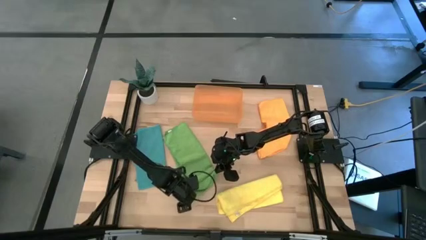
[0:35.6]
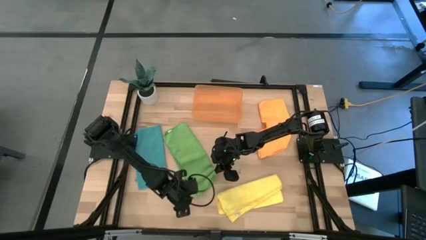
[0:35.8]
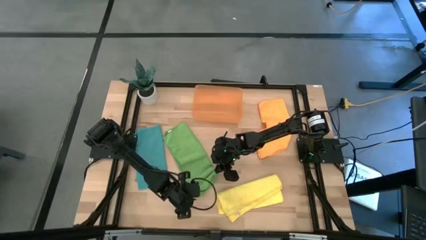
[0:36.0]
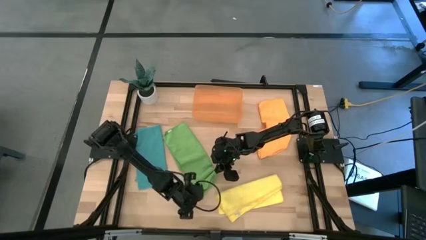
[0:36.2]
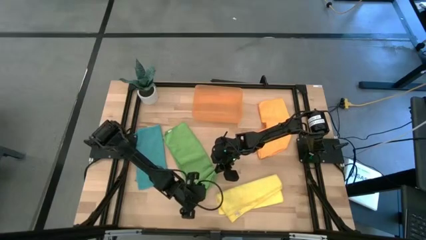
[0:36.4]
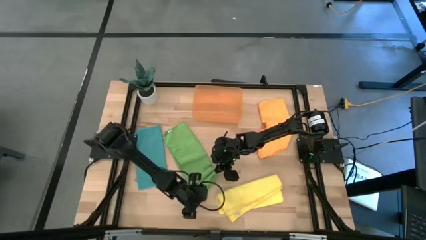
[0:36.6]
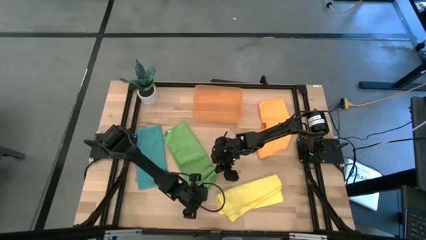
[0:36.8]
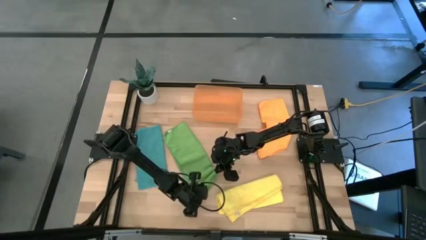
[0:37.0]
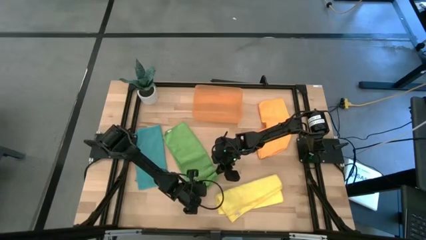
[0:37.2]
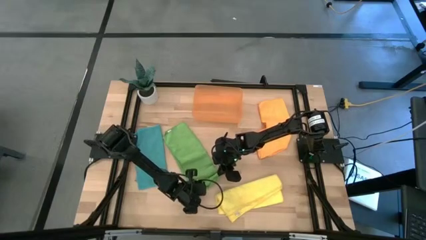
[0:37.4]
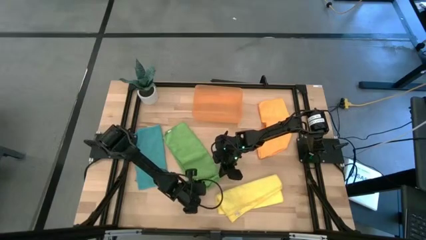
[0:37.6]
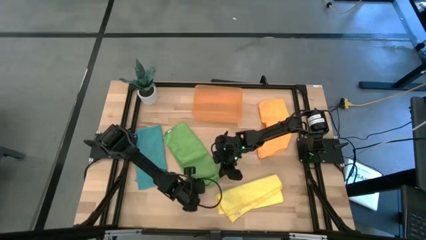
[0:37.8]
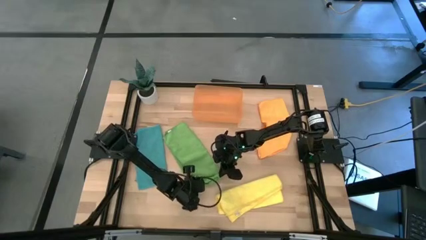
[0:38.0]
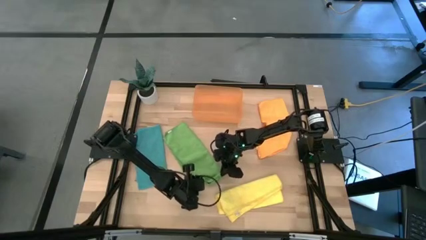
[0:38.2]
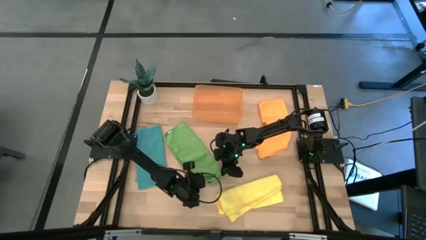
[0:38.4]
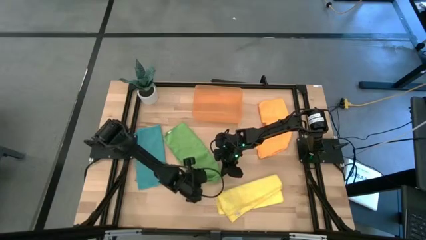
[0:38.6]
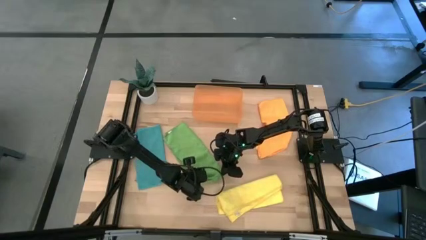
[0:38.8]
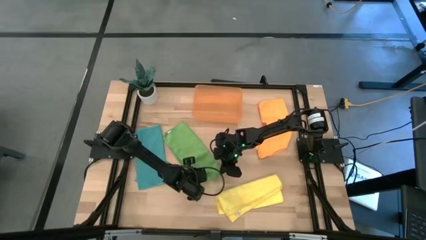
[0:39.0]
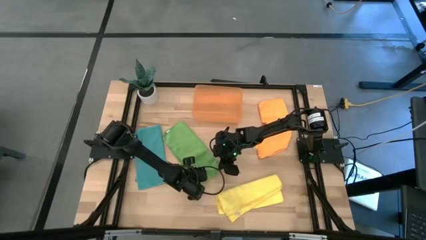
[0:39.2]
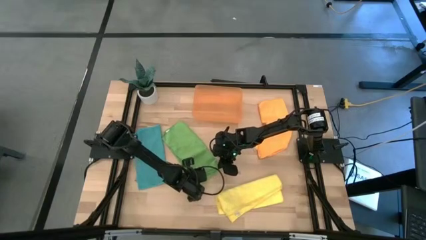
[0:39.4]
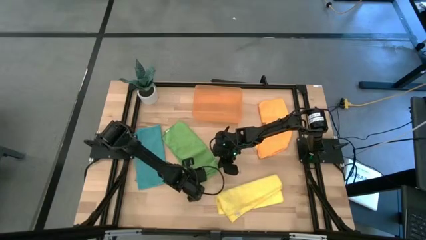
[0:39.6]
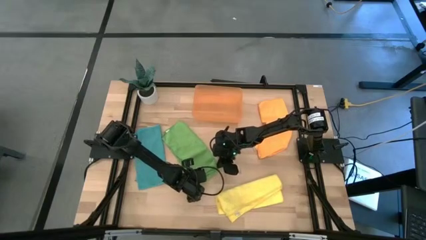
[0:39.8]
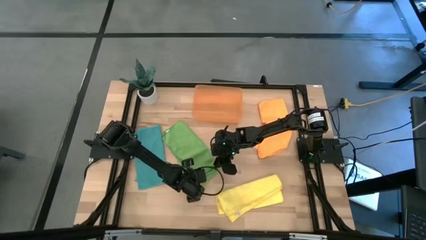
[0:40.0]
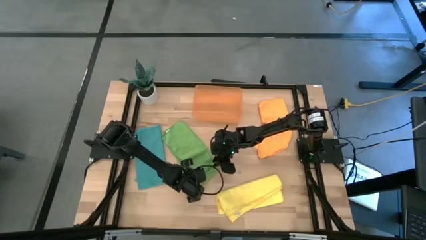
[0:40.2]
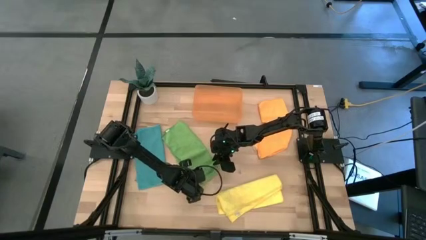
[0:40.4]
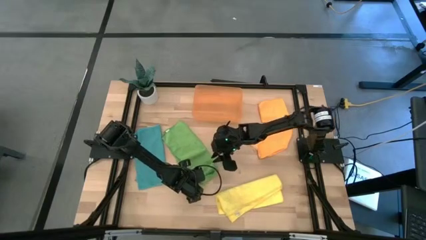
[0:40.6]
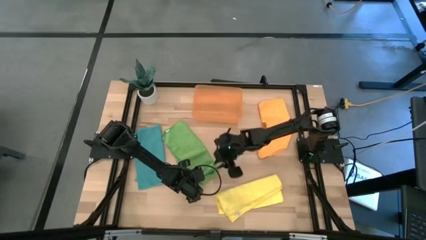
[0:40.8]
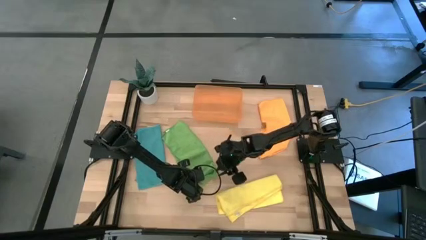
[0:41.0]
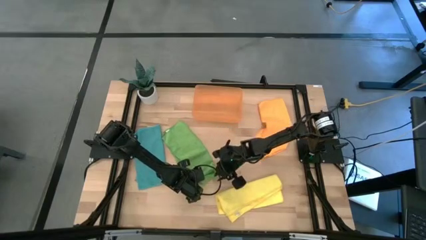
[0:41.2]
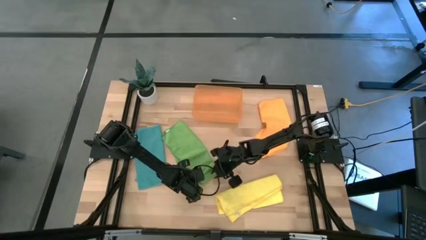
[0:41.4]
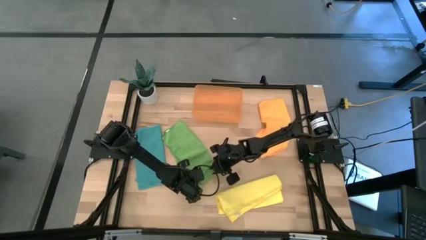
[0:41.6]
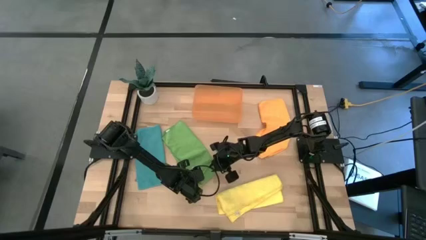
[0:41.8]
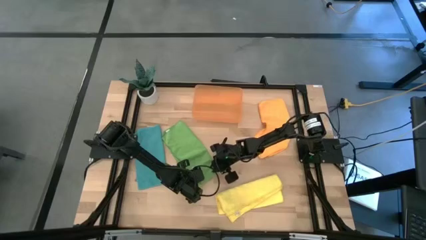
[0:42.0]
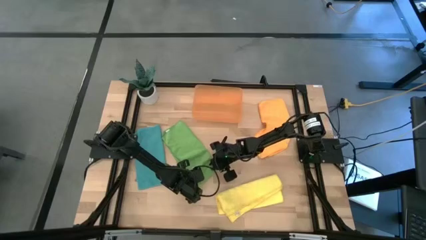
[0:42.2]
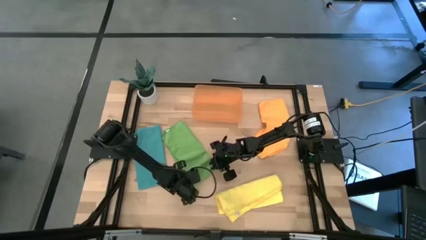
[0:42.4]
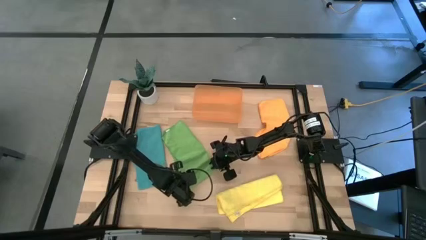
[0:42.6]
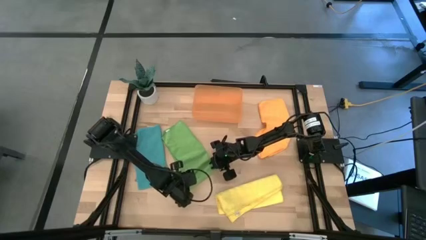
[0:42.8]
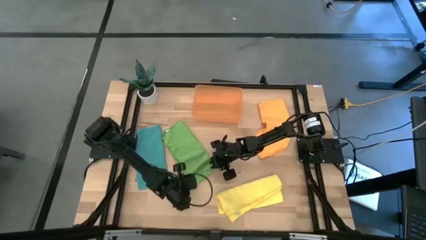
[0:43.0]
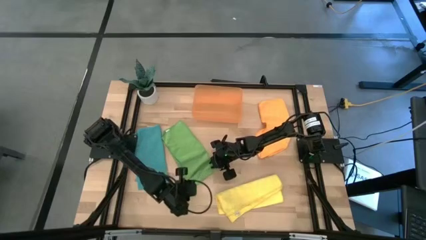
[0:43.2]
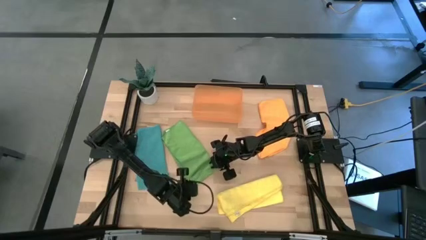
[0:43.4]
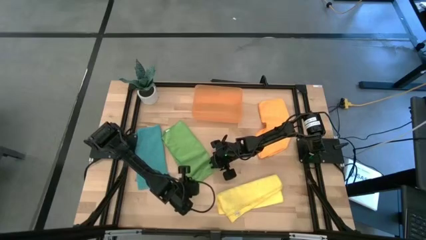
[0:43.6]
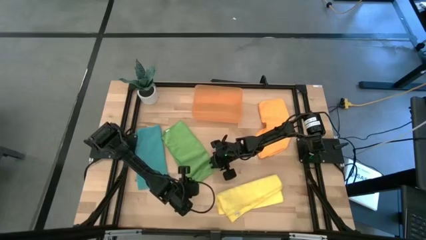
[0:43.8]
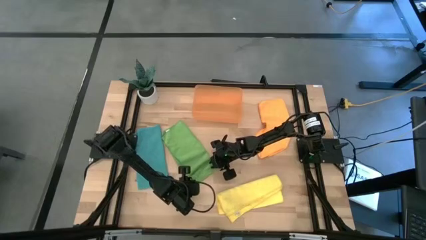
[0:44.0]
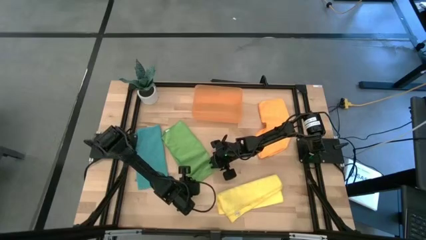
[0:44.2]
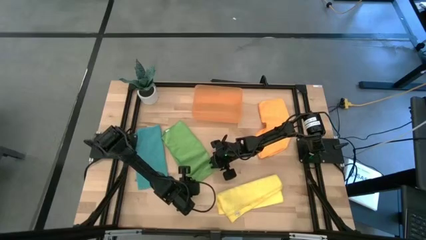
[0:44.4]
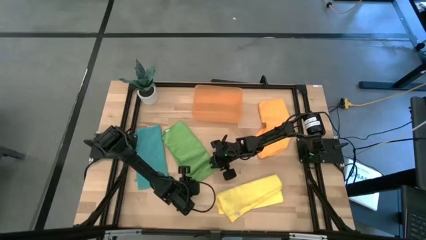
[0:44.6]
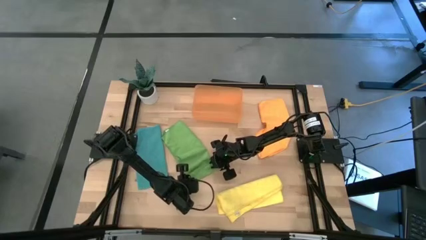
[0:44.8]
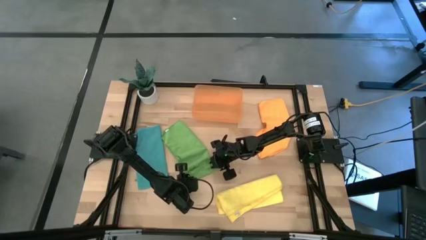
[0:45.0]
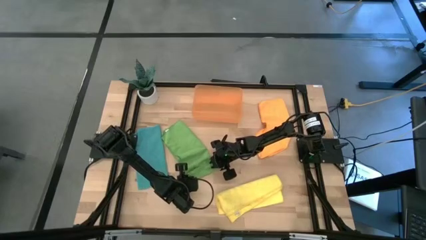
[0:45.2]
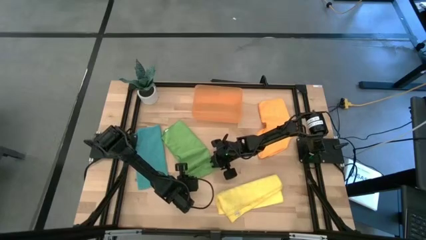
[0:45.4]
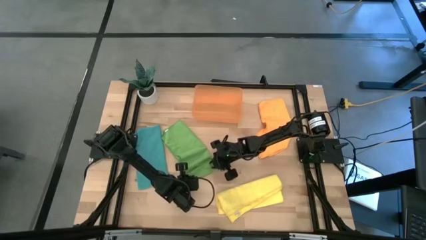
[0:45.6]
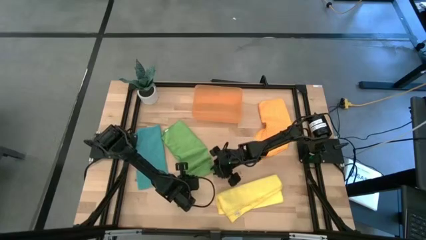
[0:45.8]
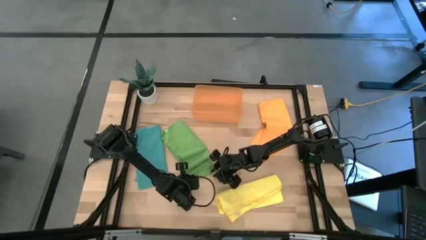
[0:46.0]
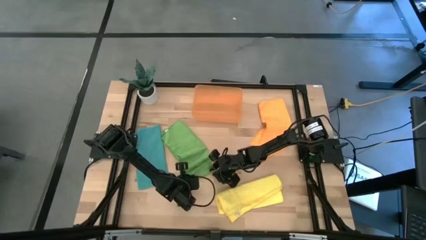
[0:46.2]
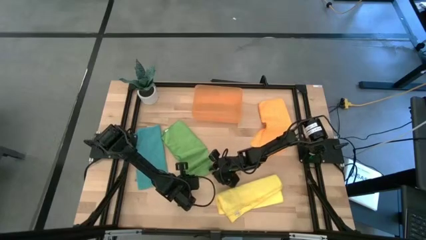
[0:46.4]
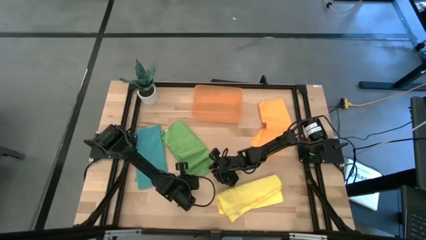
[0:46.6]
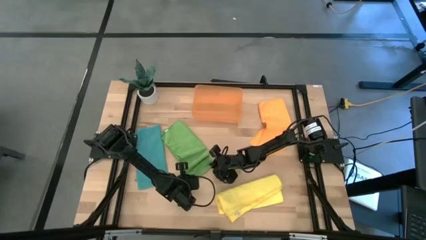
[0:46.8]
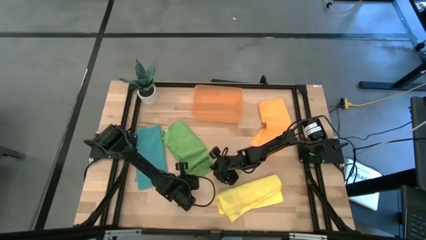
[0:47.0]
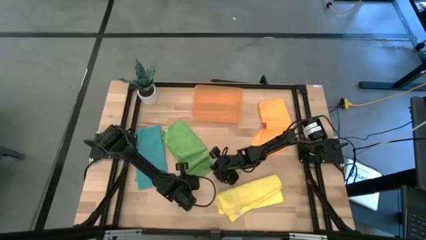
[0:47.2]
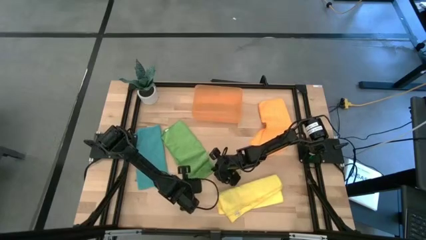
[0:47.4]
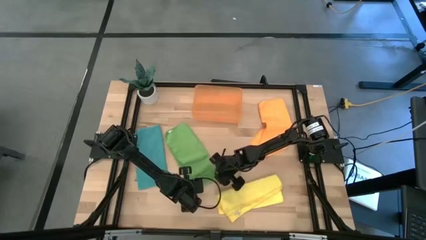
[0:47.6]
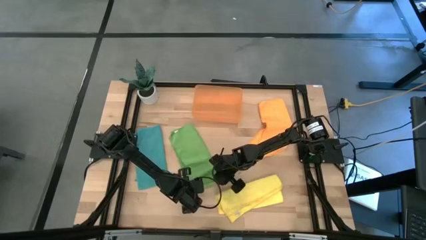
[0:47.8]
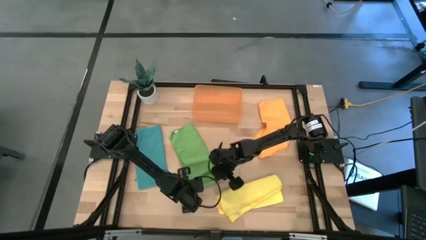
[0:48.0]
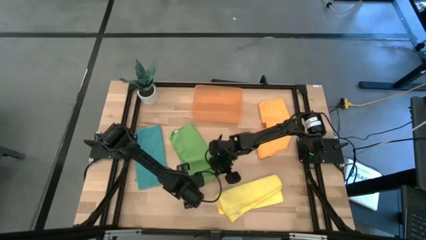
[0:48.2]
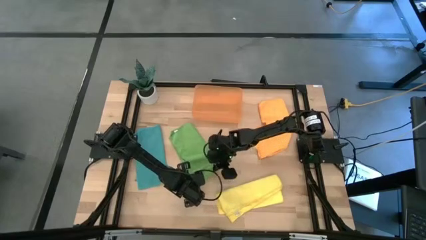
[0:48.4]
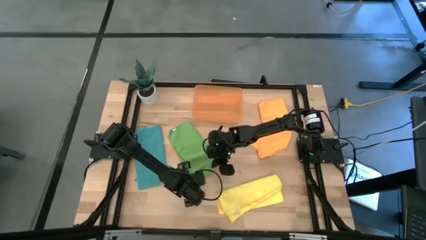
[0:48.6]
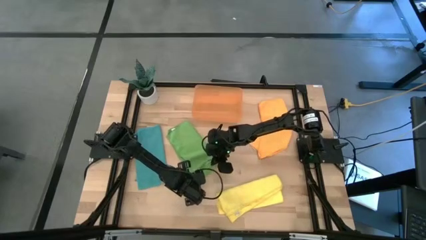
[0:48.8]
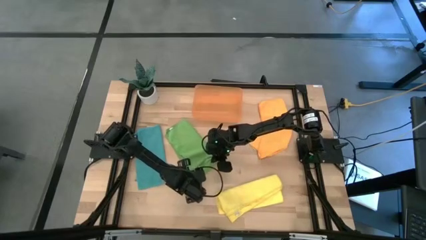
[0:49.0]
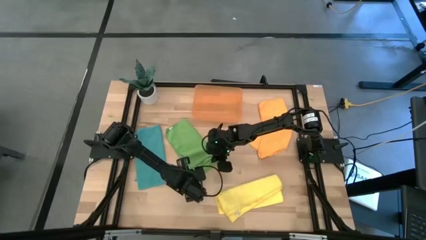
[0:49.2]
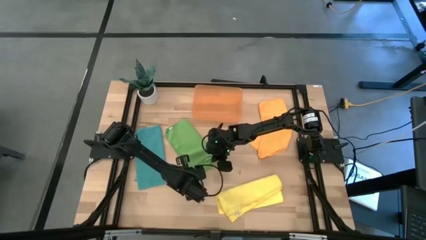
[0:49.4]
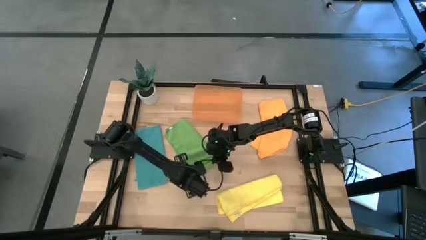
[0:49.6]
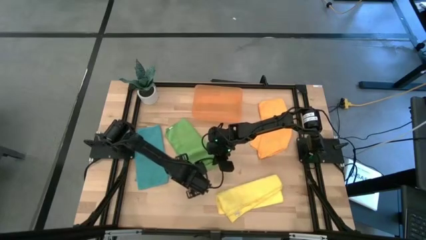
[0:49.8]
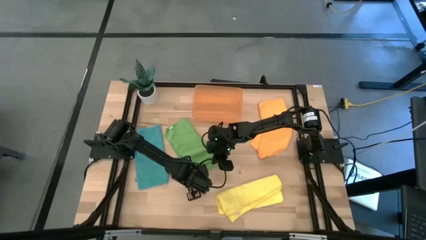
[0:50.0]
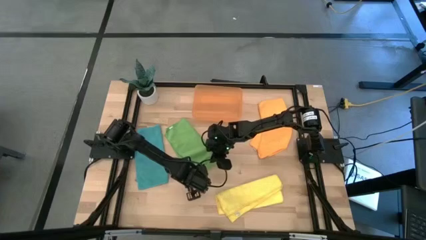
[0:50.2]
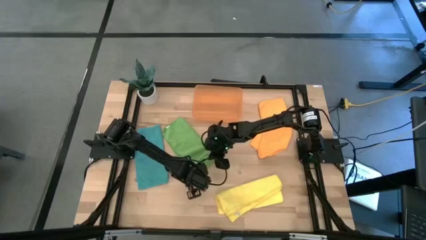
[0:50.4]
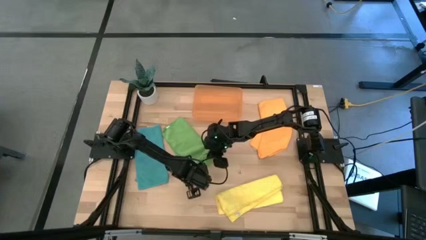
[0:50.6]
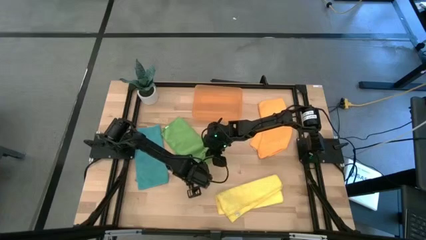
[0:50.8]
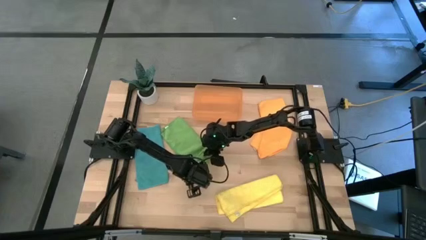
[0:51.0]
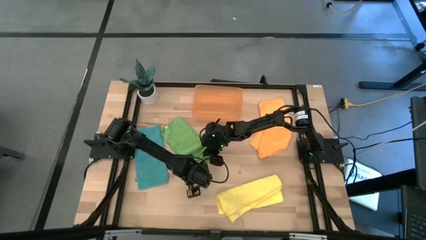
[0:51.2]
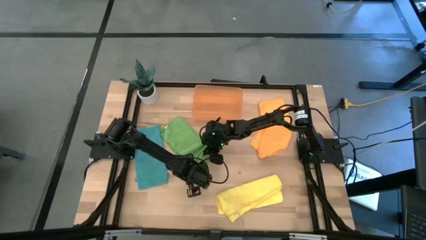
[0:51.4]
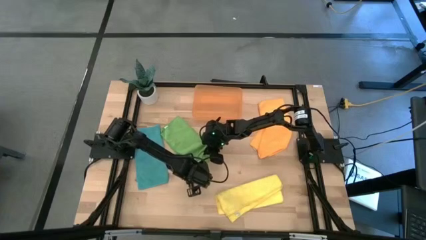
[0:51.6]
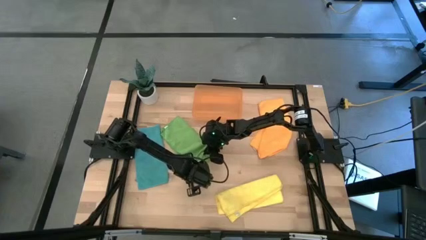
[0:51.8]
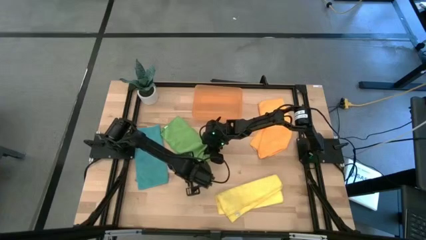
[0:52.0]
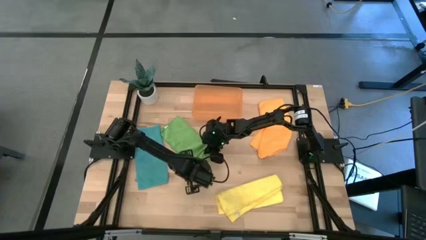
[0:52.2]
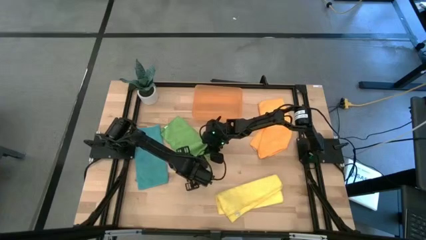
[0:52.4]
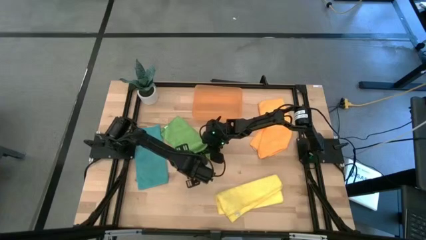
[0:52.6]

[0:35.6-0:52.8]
Task: Roll microfiber towels into tight, uniform cylinder then place into a basket
Roll the green microfiber cloth
